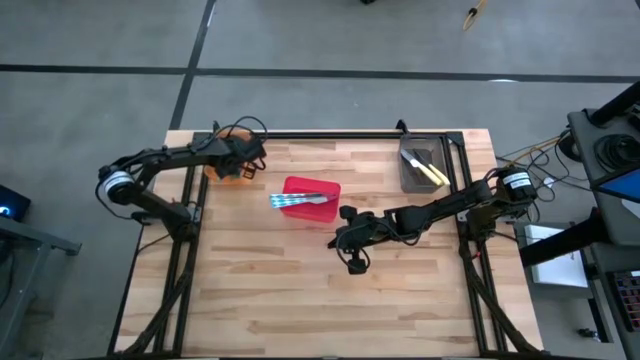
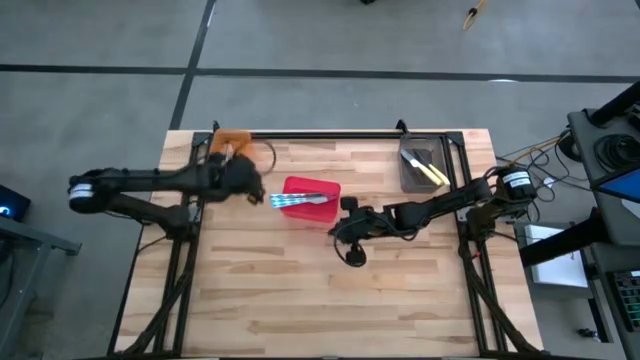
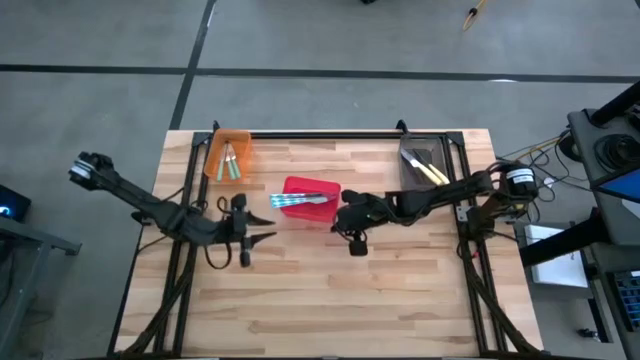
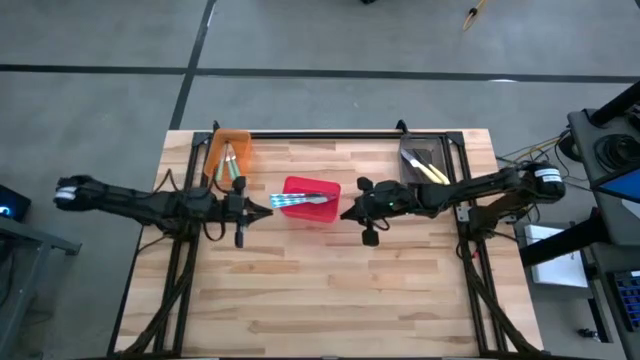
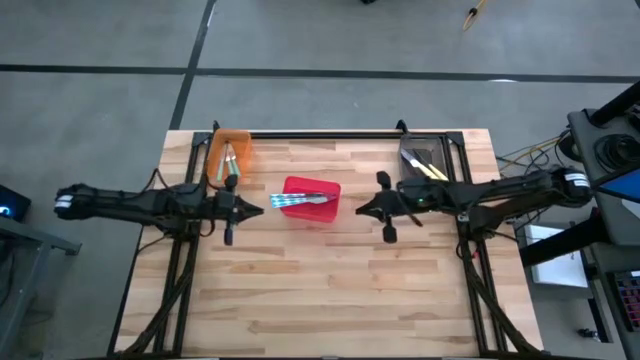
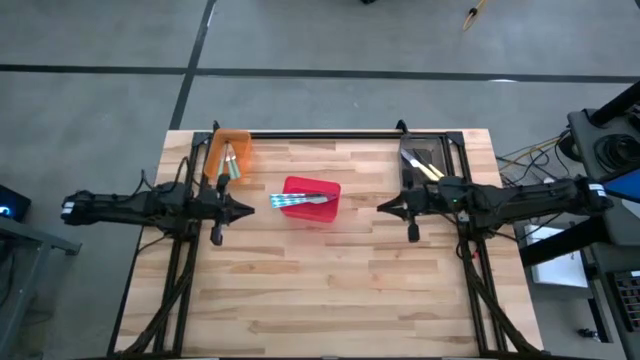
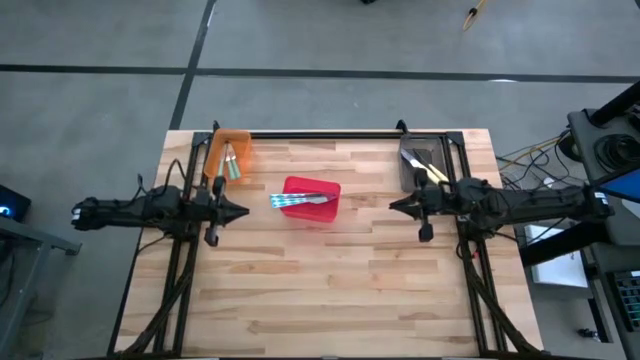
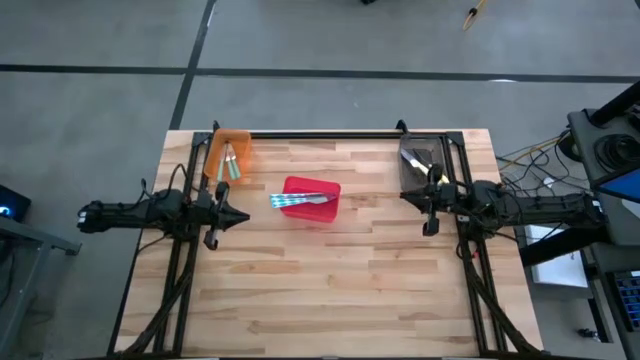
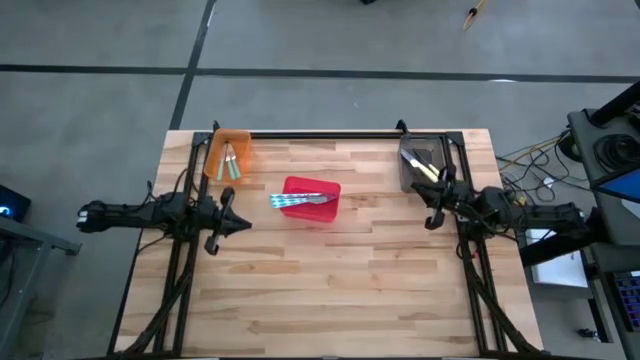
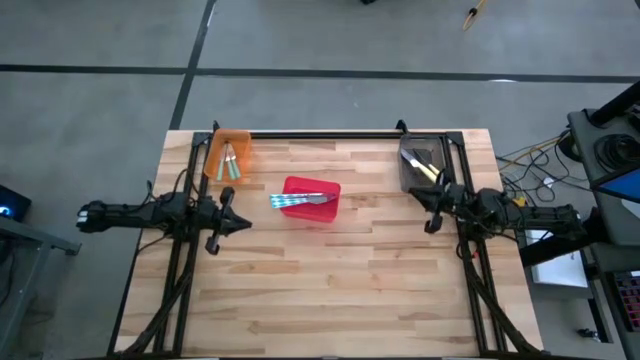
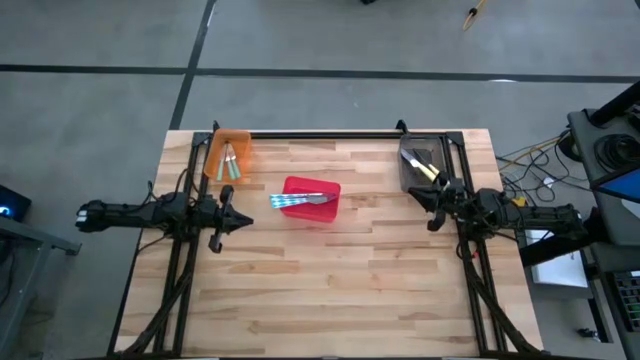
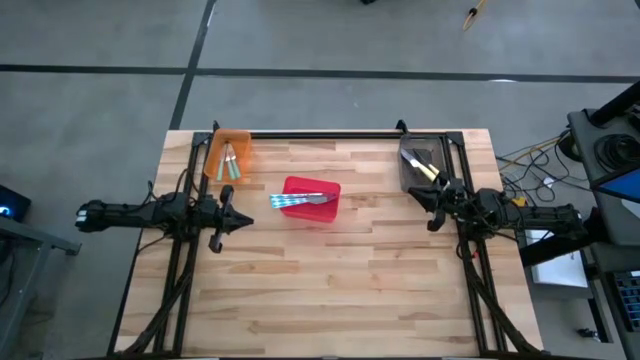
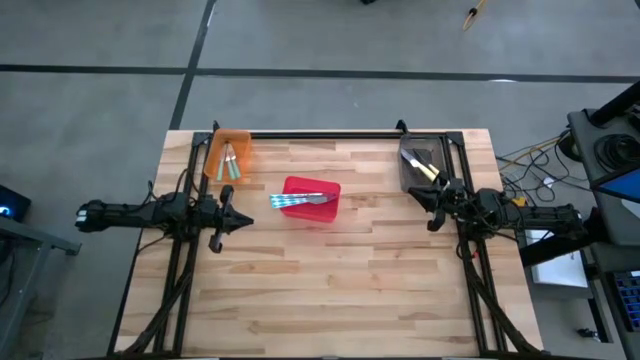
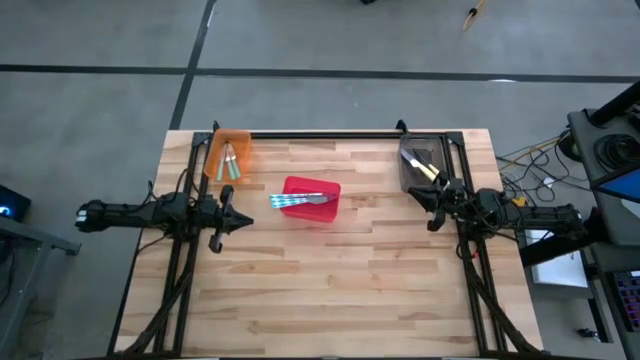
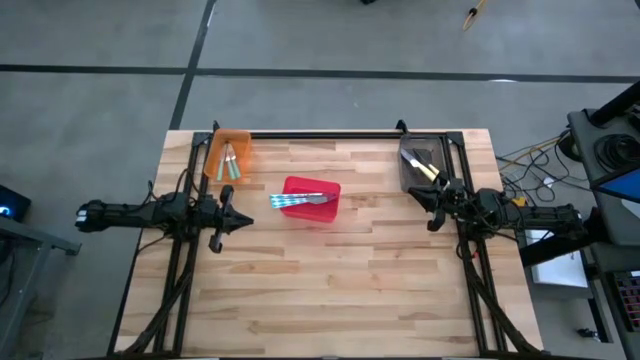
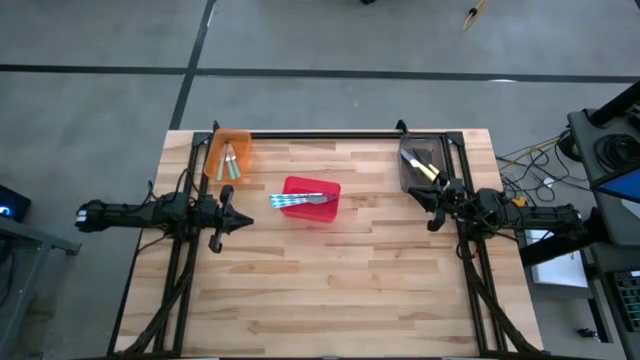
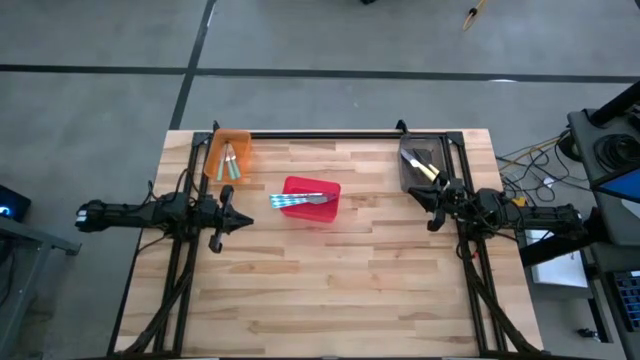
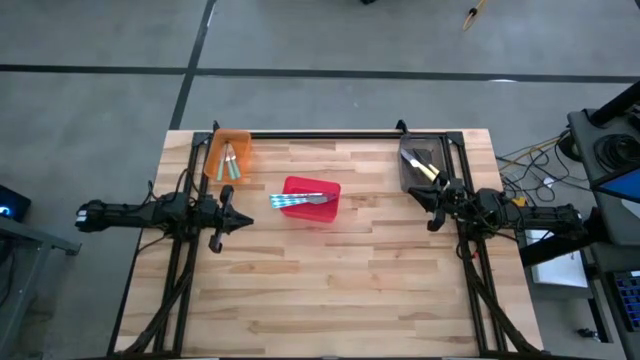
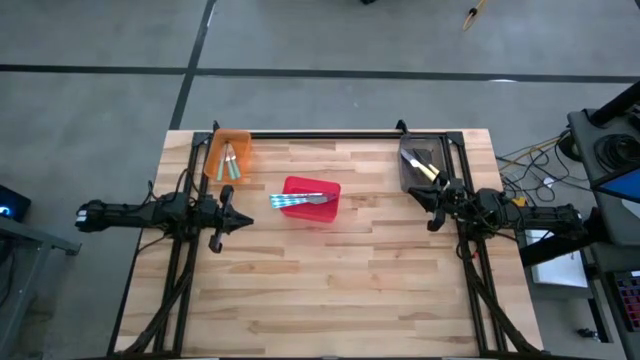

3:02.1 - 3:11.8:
Task: Sort silverware by color (type)
Return to Home Position

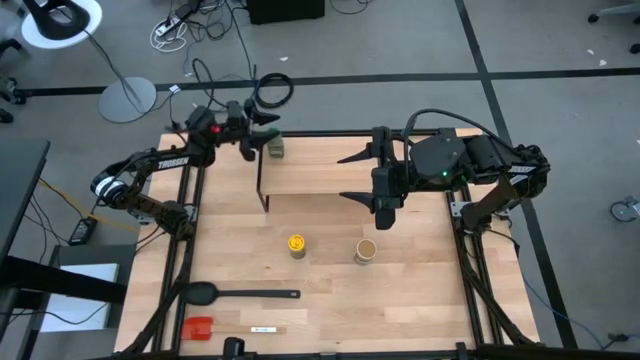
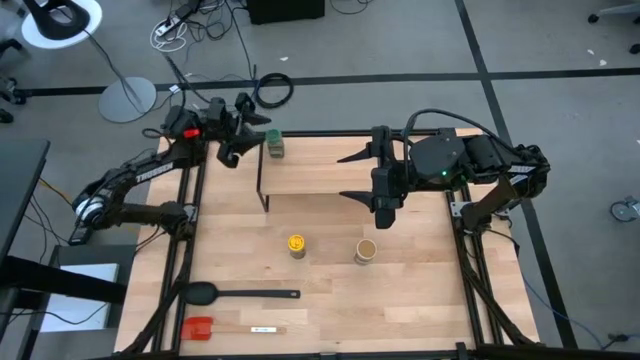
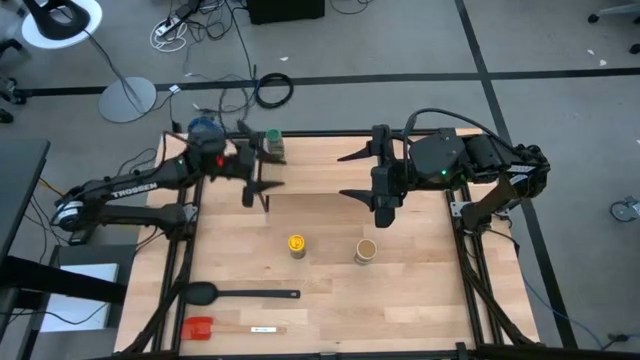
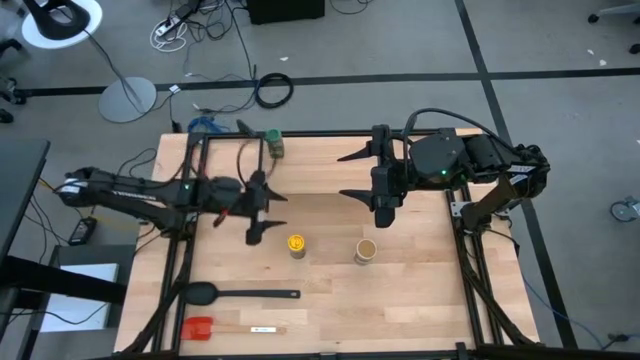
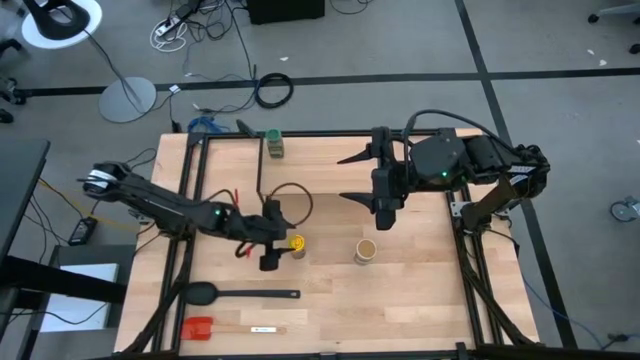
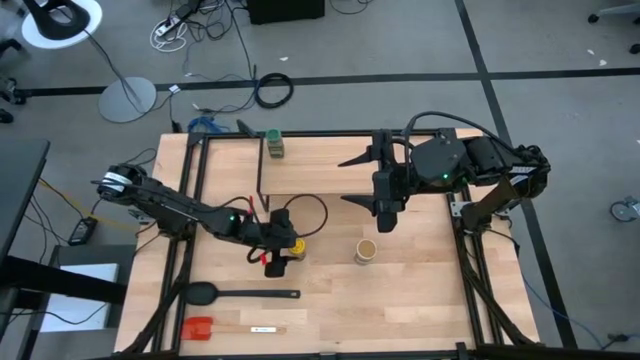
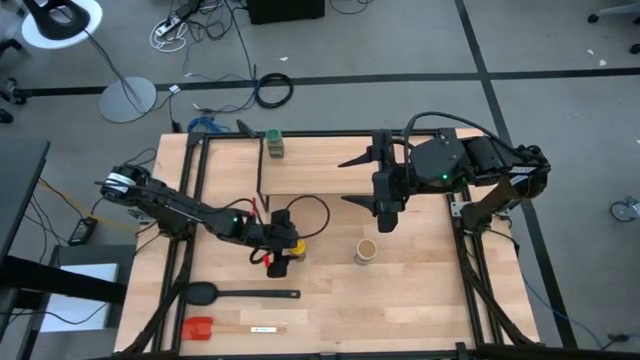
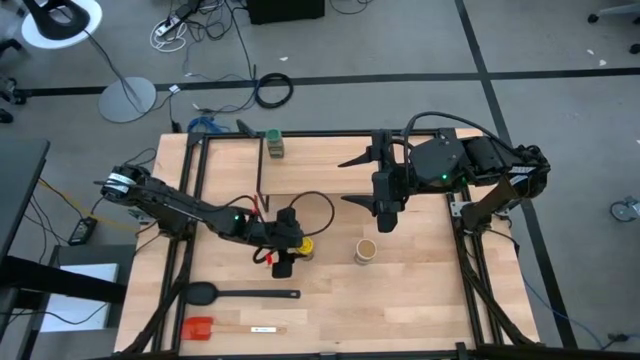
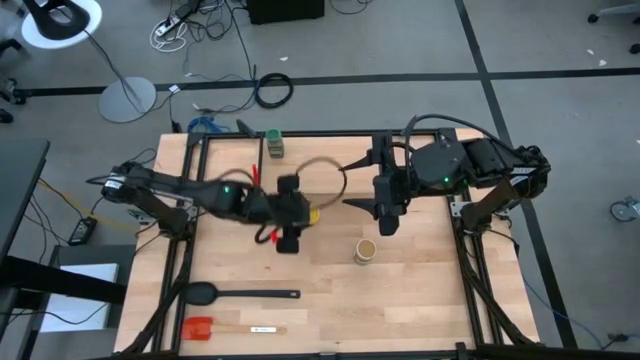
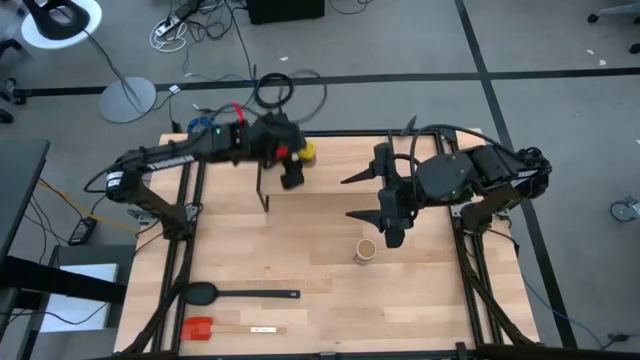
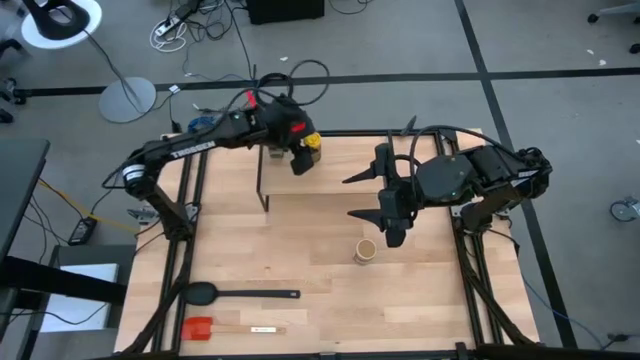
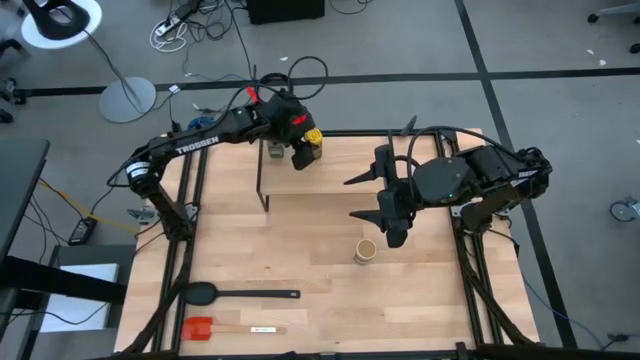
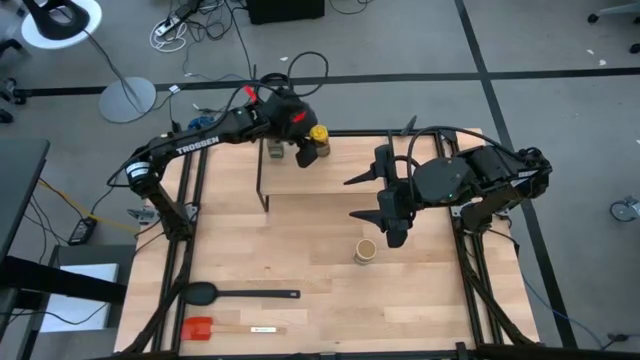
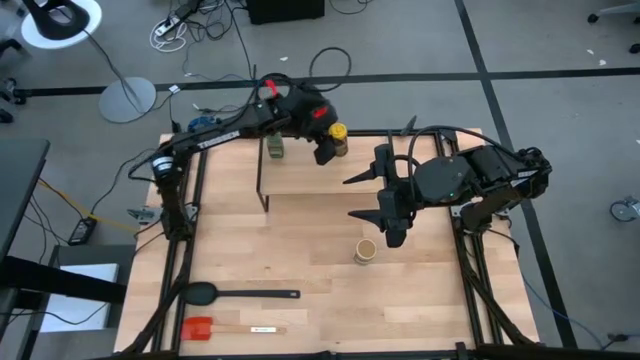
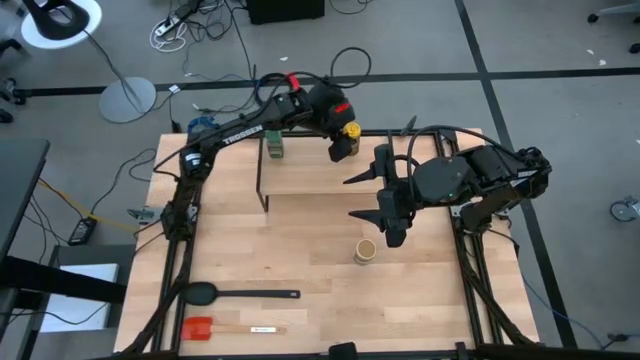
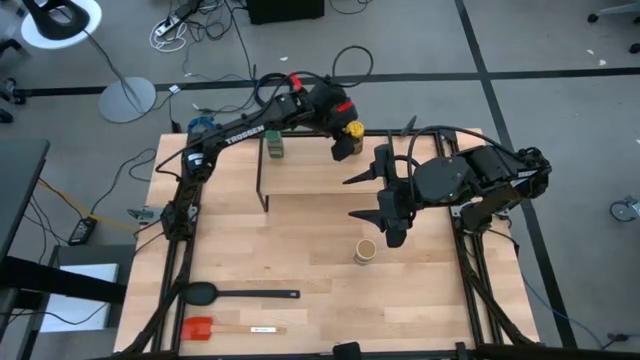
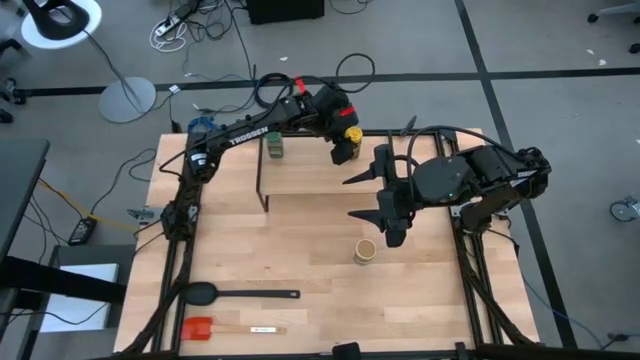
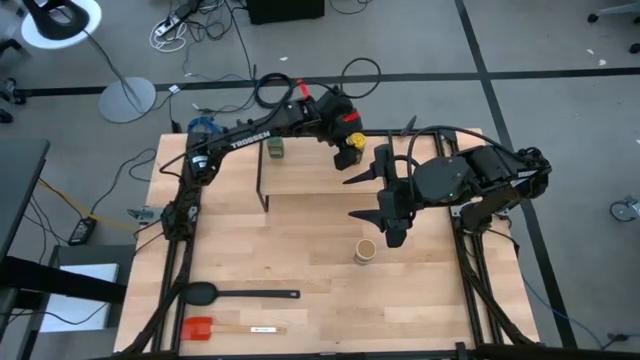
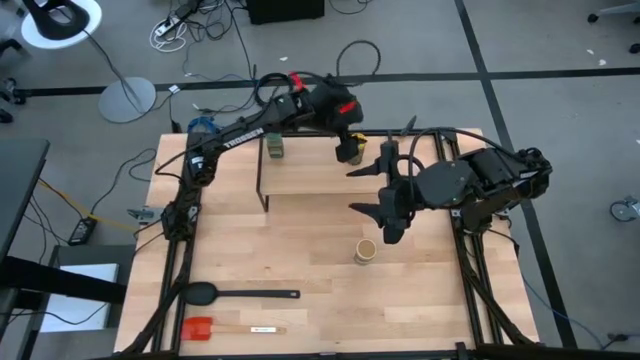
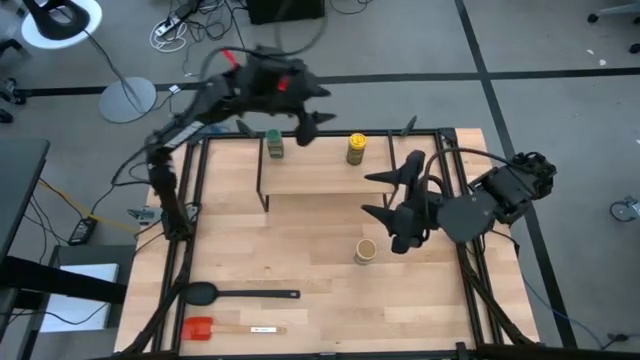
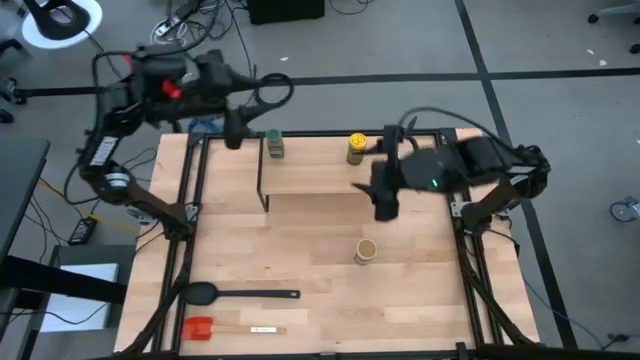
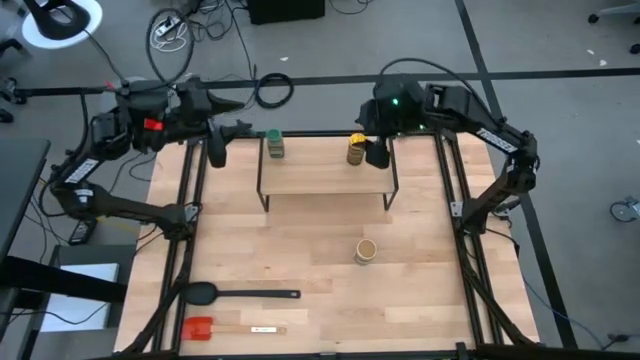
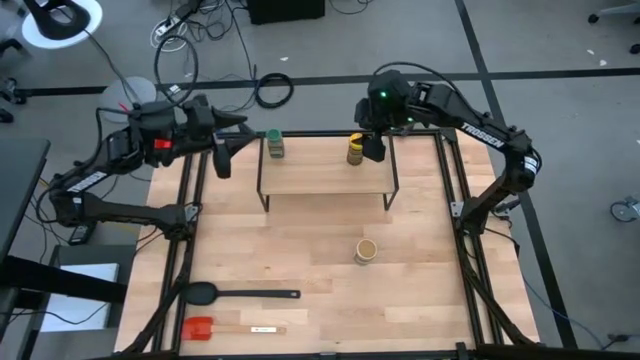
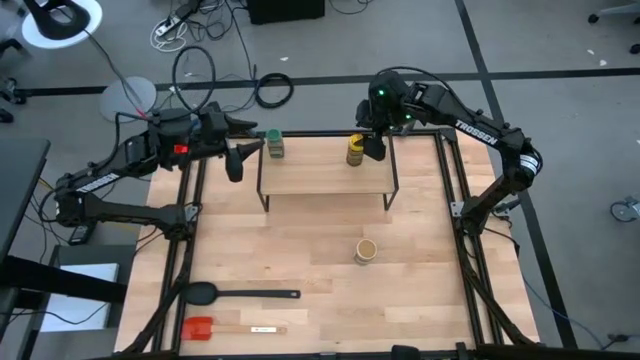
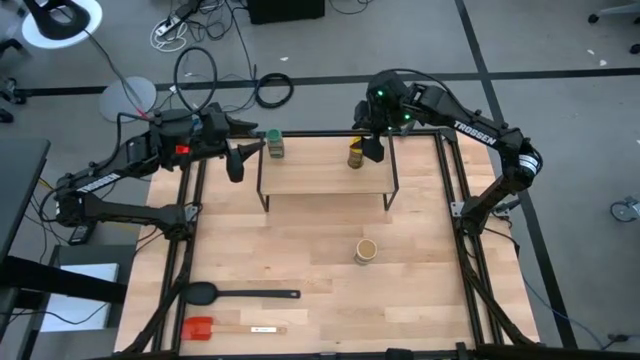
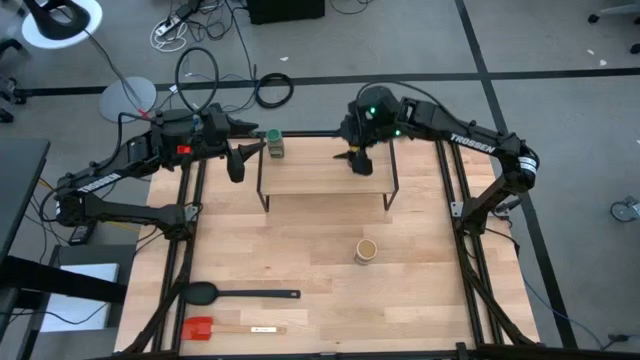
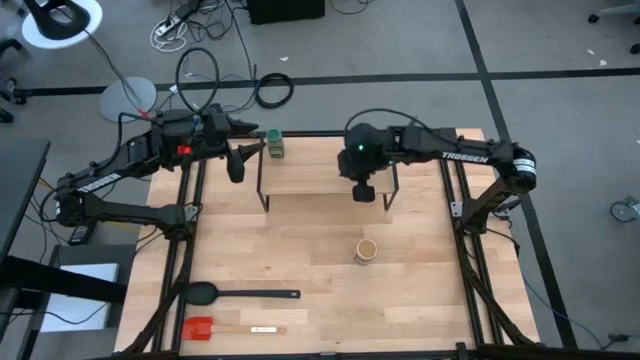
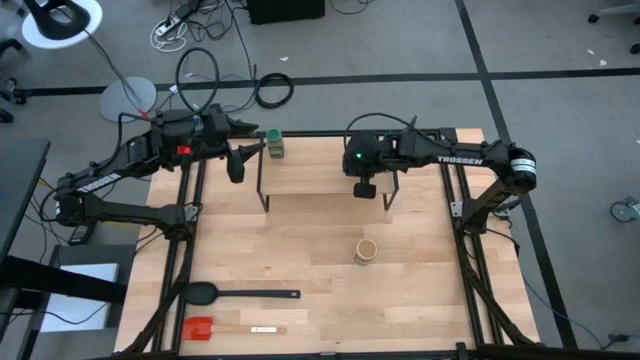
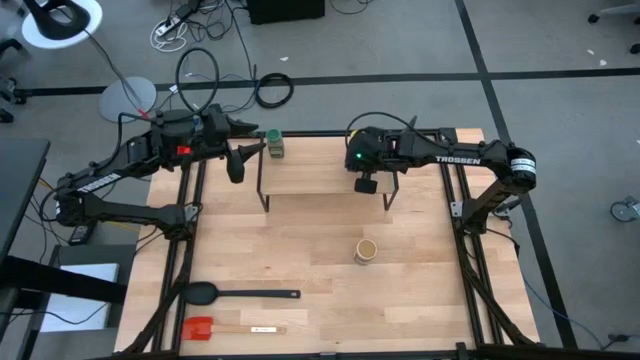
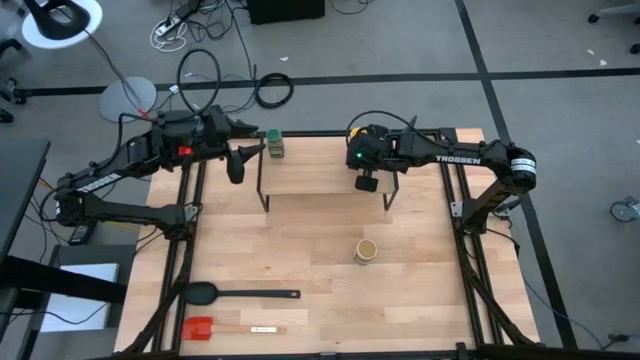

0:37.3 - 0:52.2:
Task: Shelf spices
Put the golden seasoning bottle on the shelf
